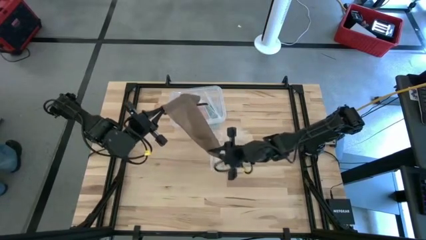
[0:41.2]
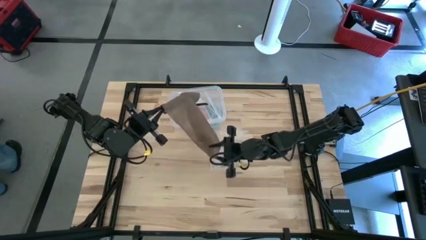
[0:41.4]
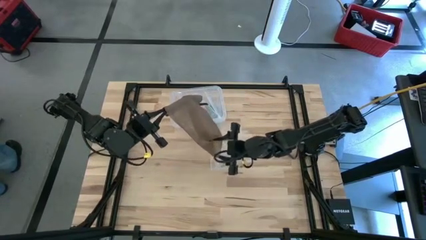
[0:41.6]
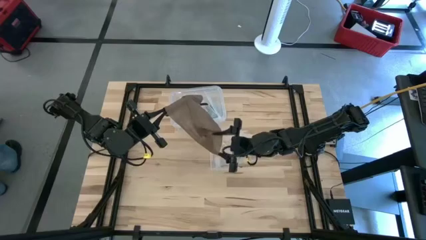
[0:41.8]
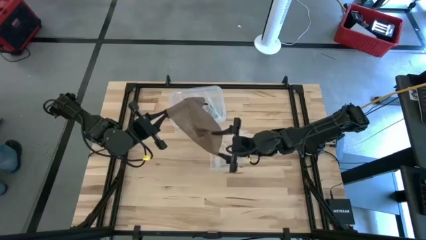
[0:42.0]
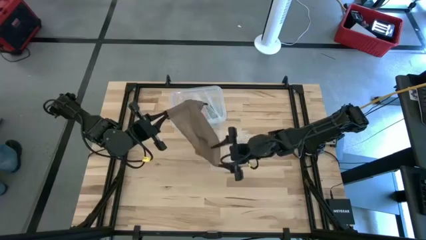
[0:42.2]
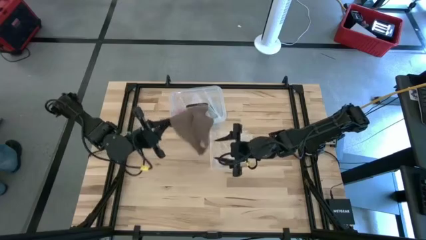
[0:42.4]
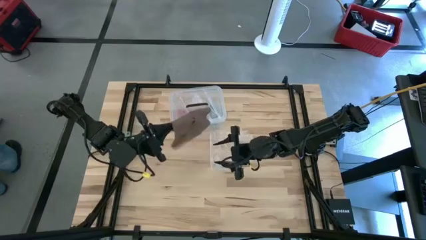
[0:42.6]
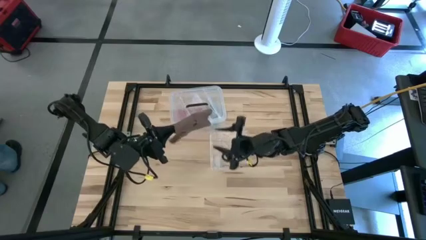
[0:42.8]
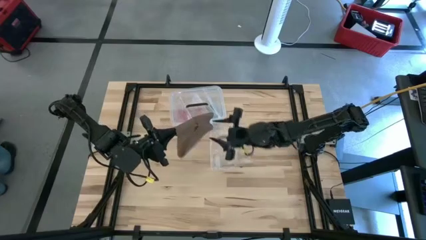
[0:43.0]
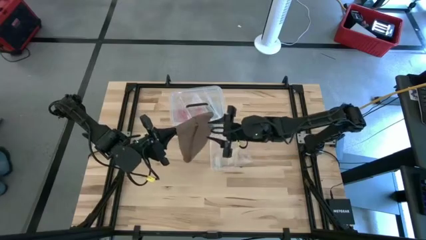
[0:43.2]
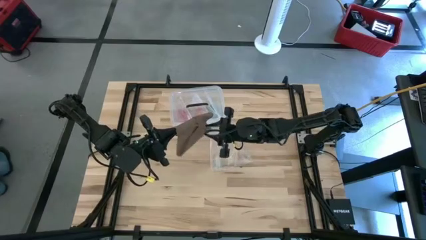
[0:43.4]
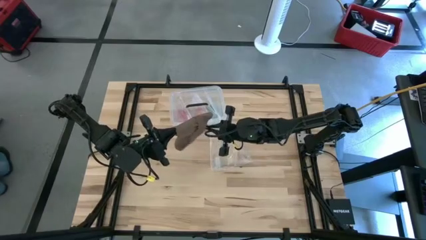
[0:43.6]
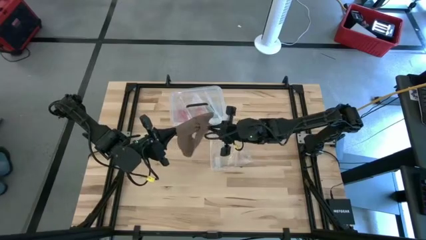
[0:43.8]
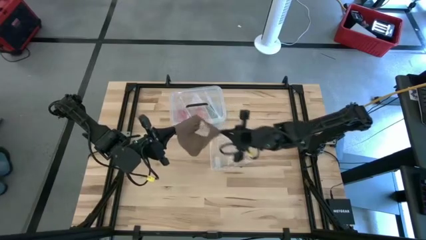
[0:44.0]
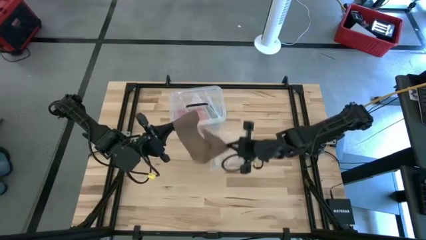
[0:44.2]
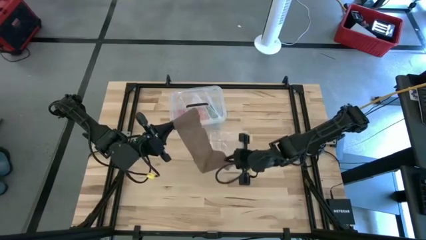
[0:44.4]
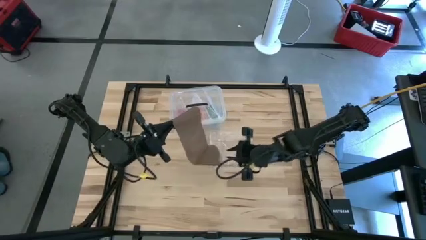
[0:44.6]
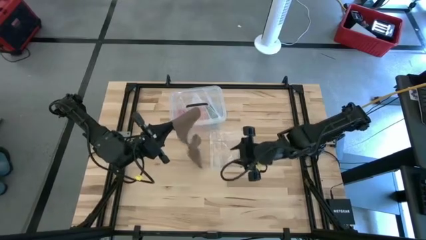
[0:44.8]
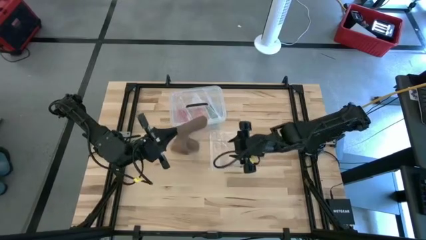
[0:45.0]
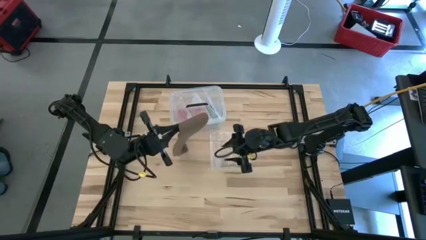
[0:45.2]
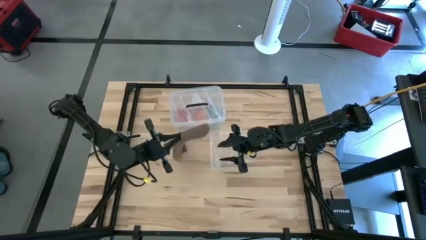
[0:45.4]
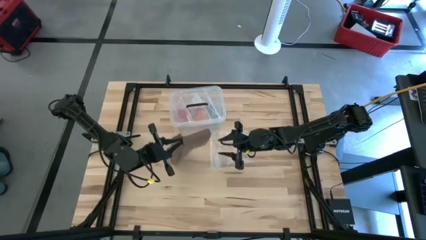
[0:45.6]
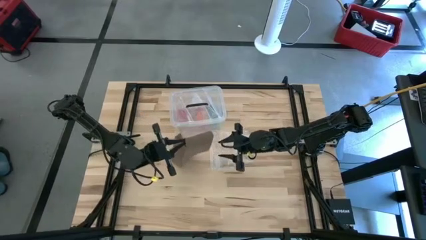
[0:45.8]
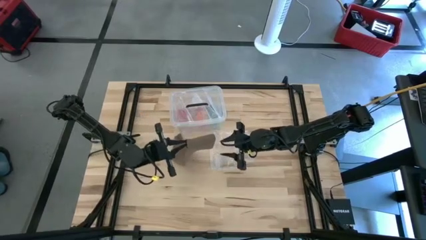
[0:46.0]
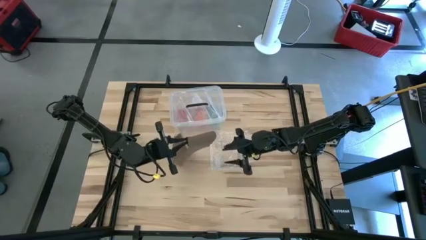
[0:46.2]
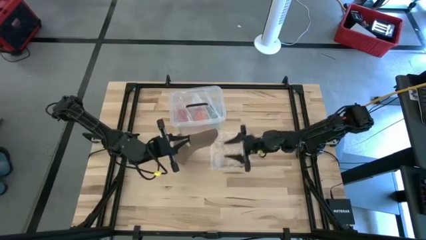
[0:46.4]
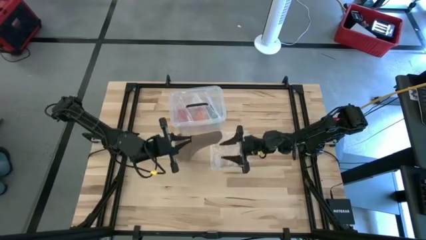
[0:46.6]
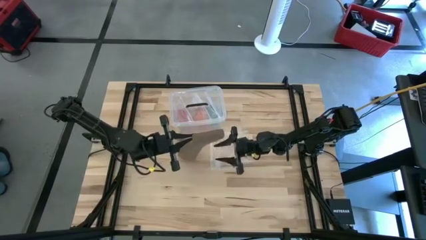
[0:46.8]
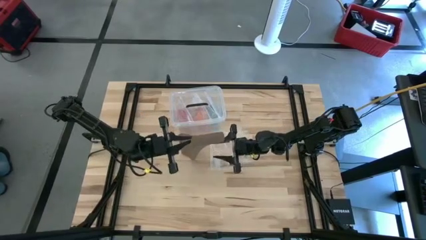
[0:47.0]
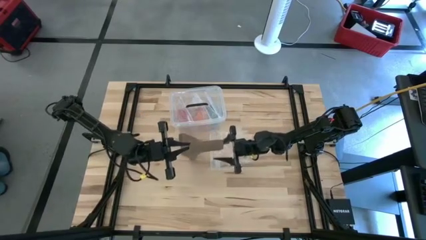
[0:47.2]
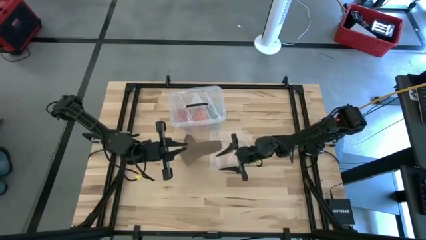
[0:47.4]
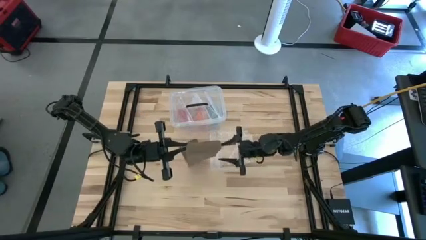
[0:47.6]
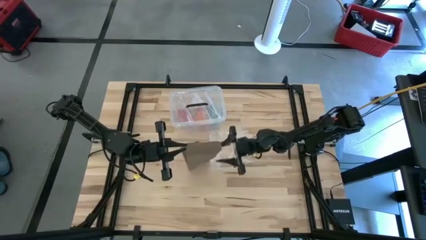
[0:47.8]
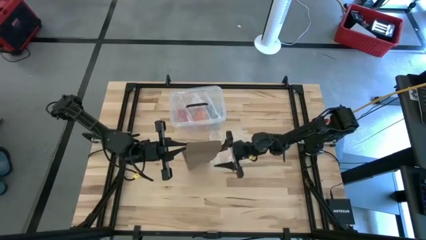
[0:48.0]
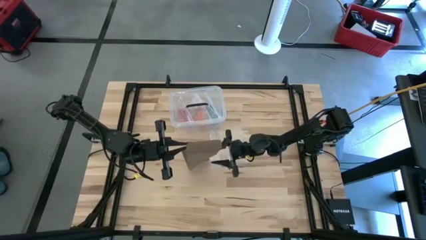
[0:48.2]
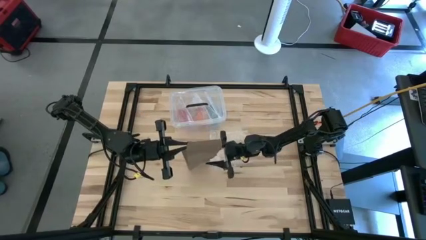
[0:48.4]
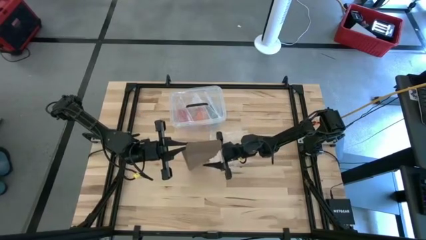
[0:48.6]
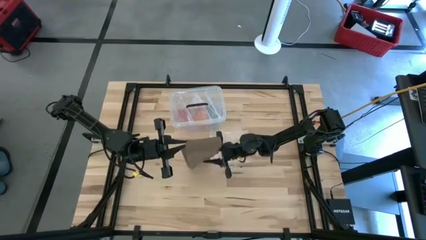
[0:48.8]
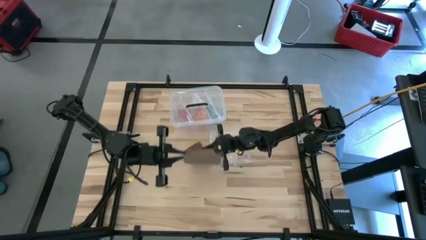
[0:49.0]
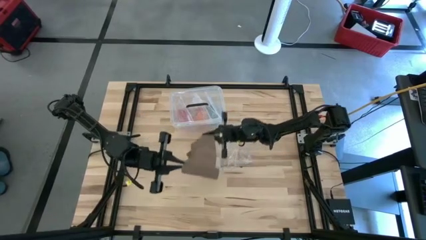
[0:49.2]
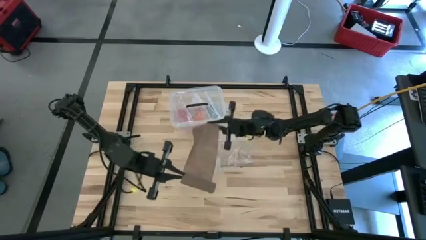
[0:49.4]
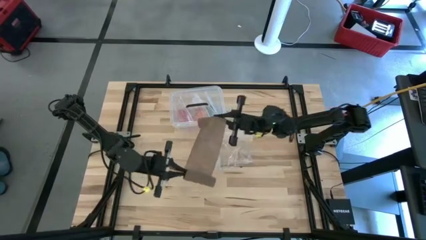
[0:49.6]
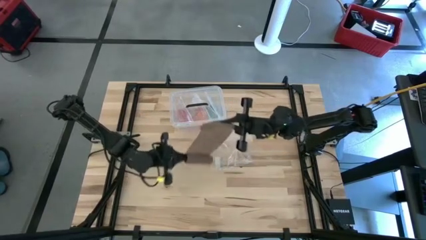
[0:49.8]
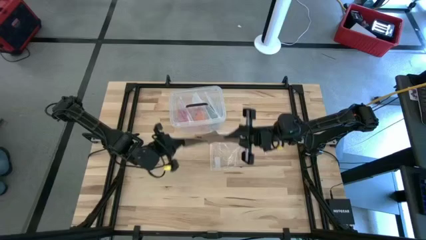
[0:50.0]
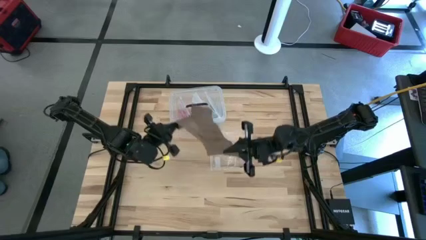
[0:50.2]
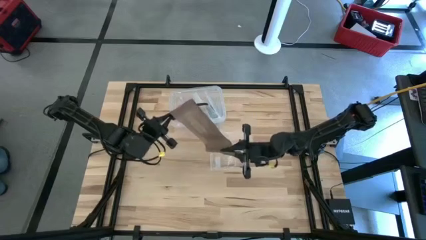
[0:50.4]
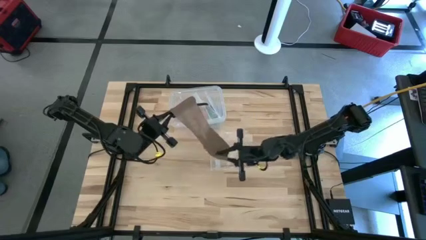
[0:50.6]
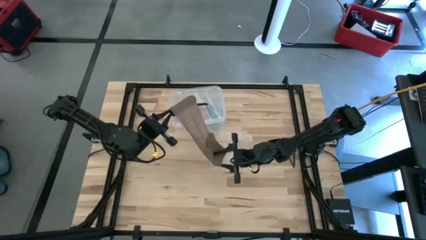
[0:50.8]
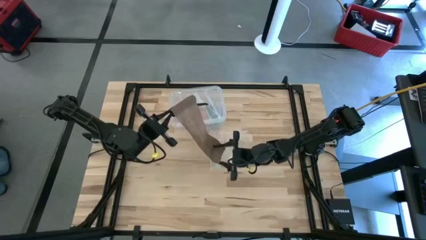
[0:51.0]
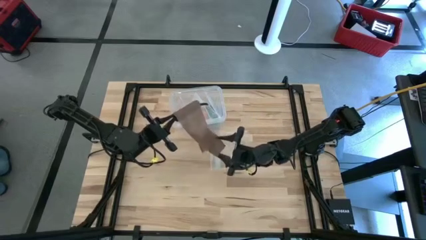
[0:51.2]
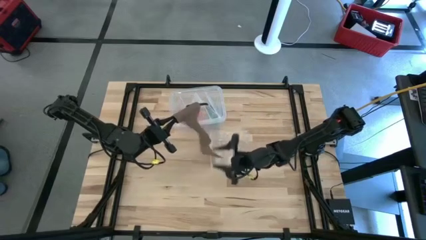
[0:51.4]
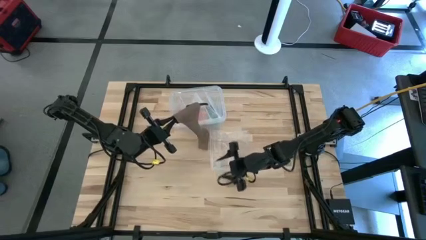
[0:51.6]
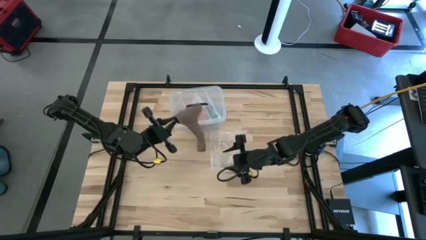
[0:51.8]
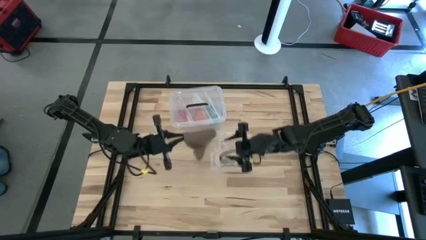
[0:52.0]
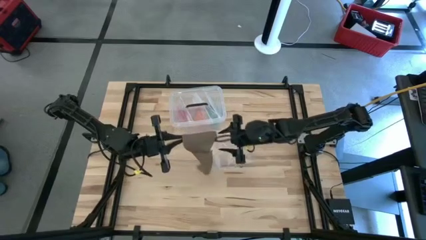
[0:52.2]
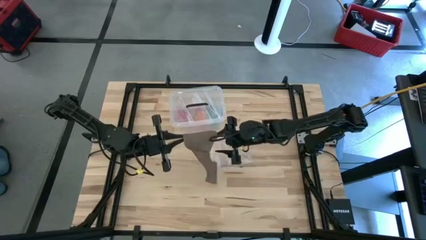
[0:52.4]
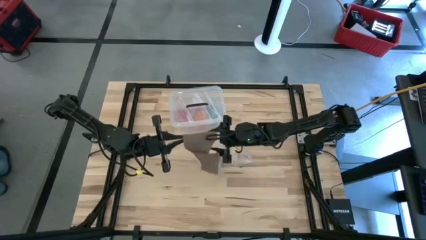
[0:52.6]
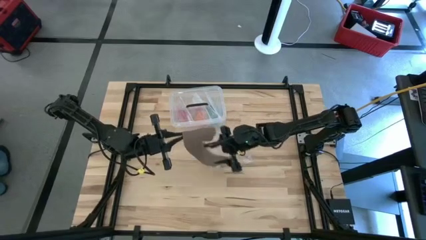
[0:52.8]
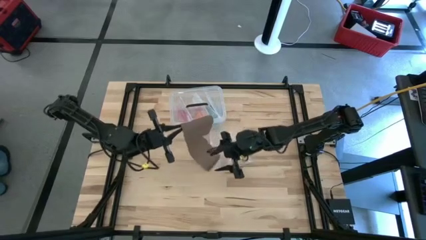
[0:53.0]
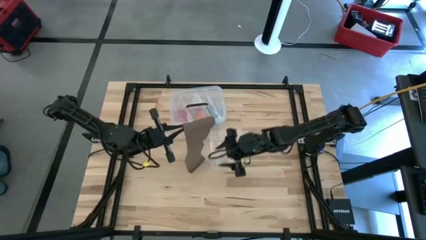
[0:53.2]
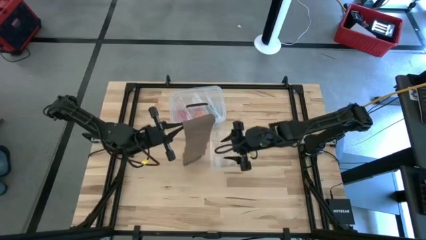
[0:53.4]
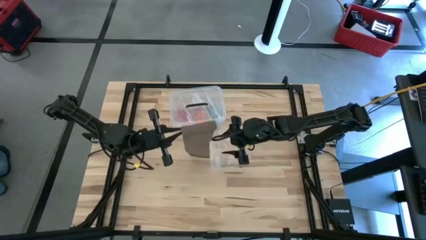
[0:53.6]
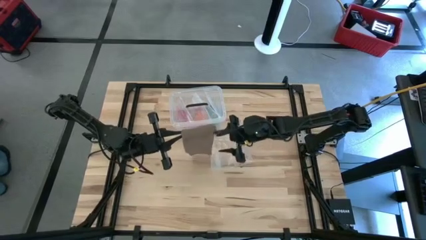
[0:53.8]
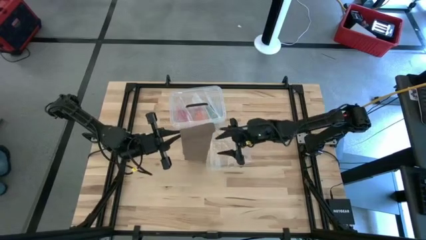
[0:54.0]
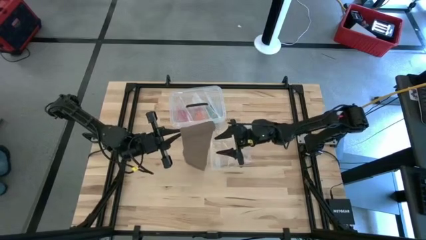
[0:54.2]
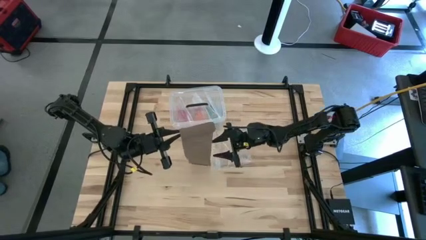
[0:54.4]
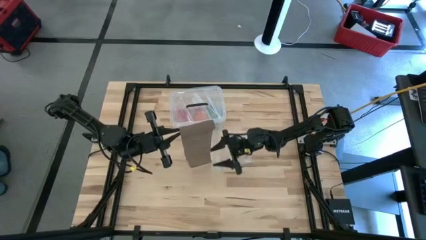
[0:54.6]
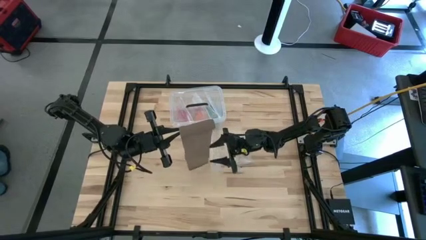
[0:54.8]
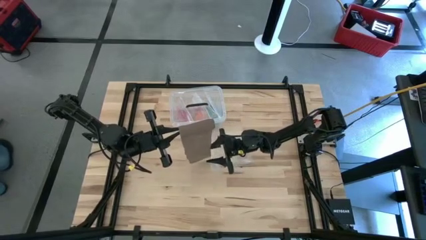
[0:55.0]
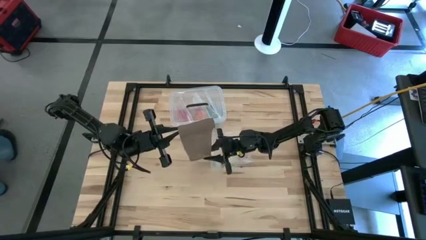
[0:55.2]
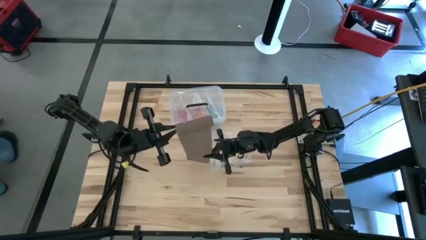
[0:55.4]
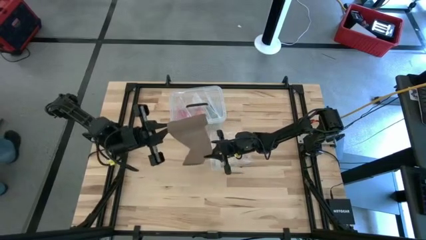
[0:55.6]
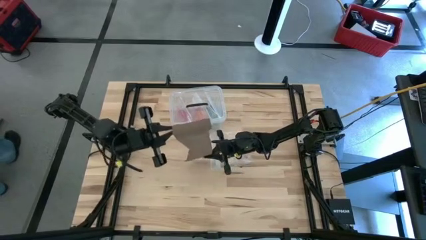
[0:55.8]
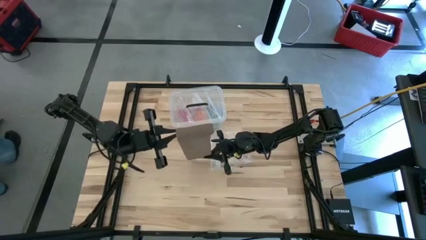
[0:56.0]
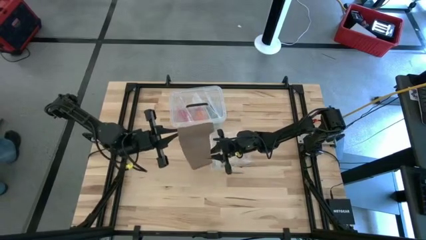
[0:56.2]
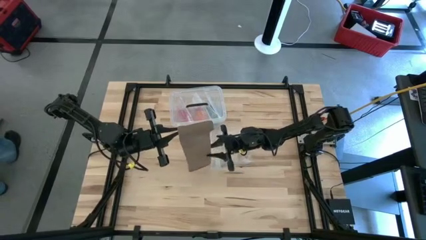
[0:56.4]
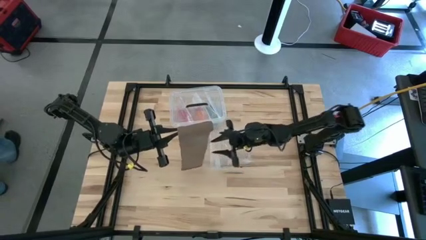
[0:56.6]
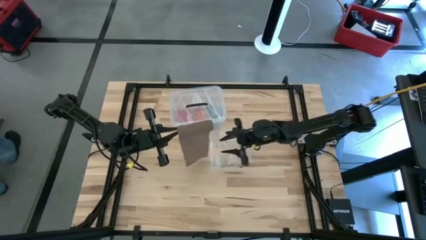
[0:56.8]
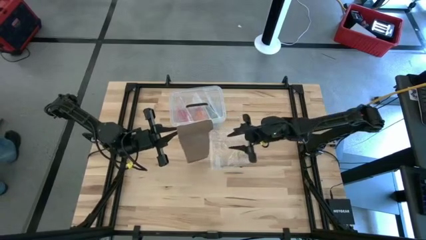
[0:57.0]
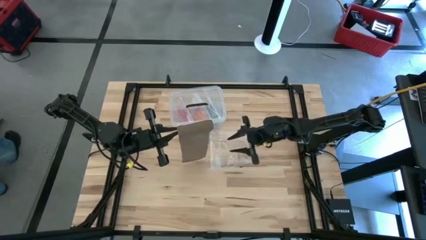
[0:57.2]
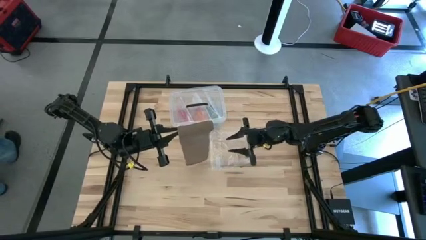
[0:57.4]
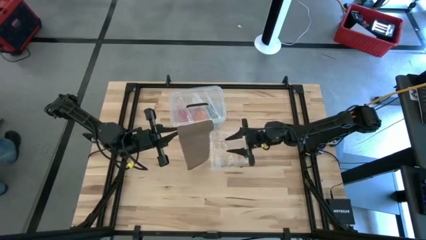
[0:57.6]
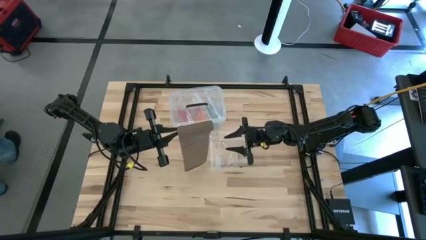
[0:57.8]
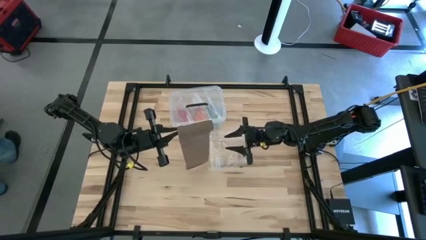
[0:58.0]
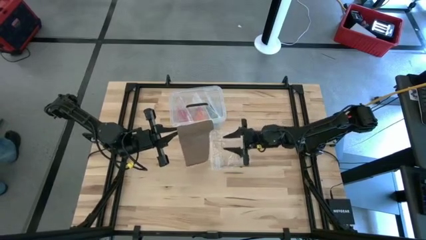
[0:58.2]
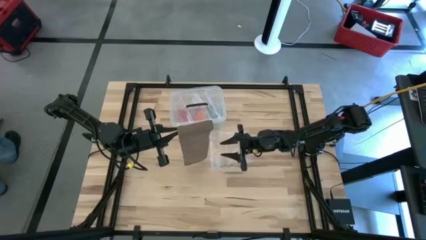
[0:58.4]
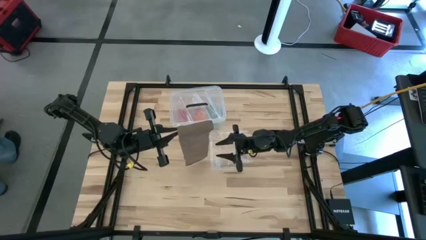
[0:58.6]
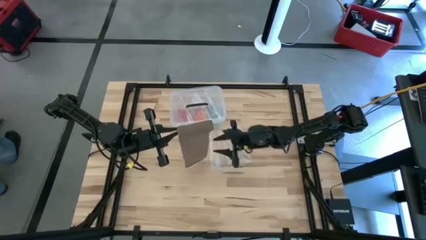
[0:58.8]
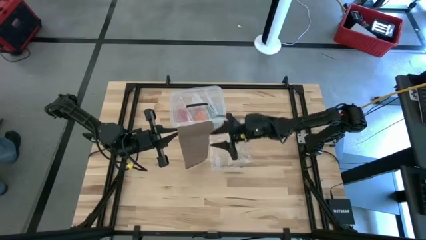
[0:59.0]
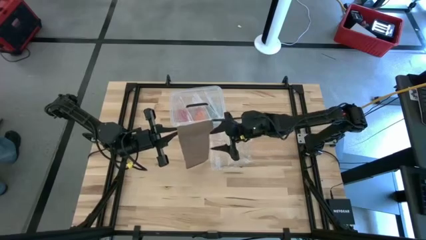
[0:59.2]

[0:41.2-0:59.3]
Task: Roll bandage
Roll the brown bandage
